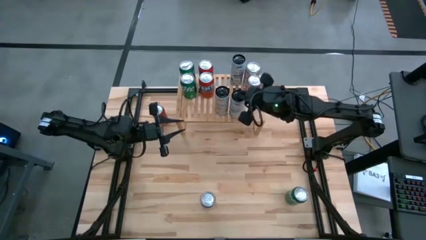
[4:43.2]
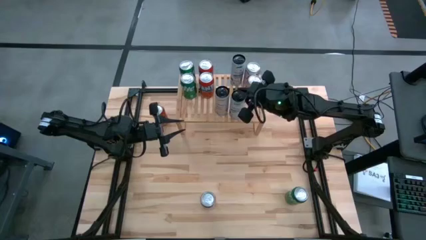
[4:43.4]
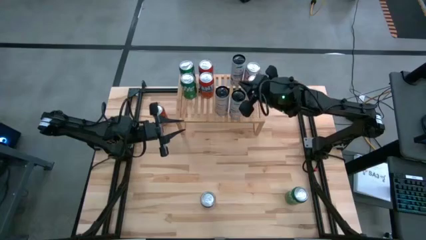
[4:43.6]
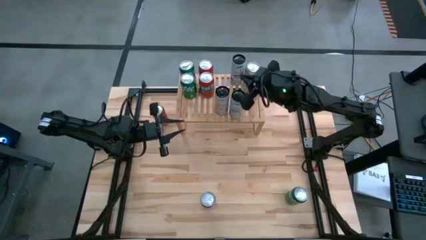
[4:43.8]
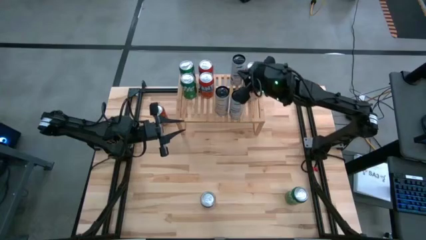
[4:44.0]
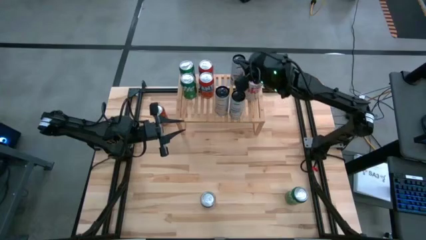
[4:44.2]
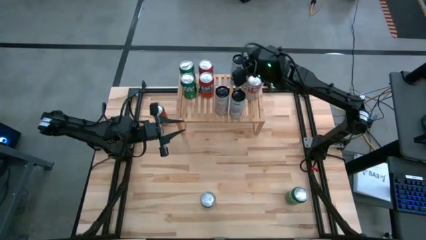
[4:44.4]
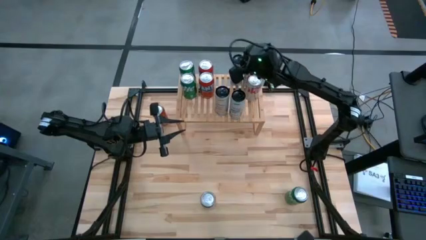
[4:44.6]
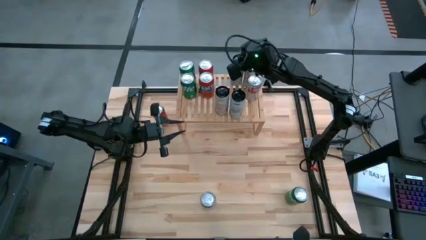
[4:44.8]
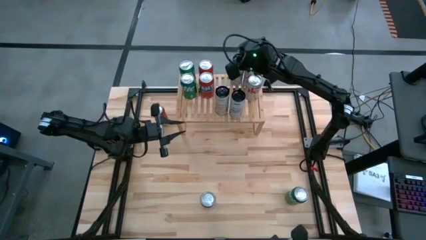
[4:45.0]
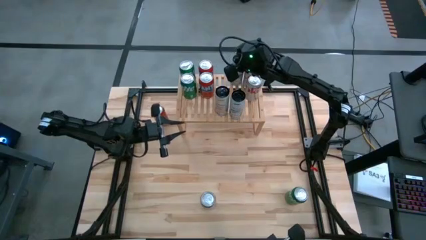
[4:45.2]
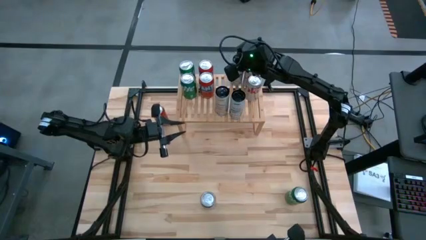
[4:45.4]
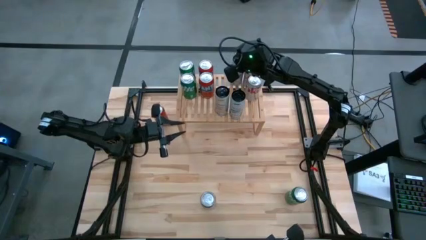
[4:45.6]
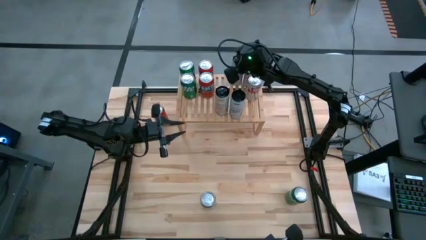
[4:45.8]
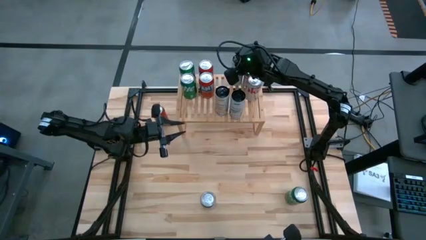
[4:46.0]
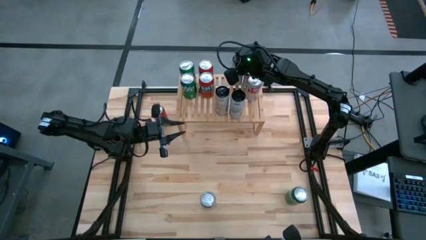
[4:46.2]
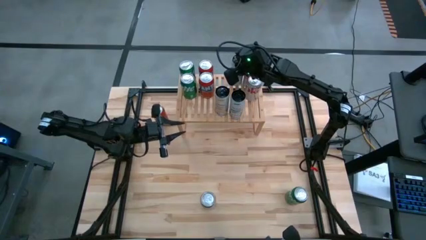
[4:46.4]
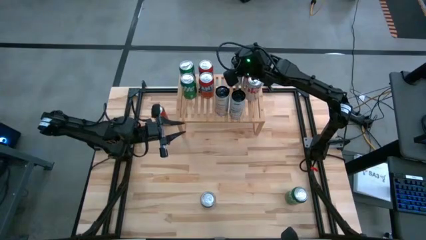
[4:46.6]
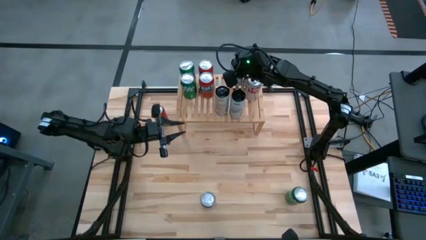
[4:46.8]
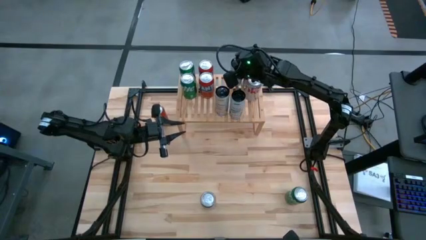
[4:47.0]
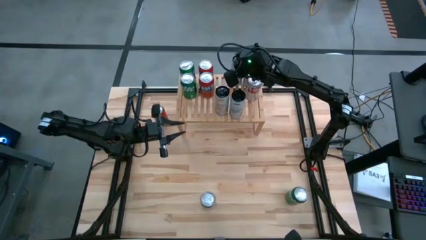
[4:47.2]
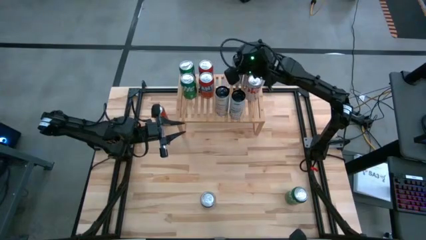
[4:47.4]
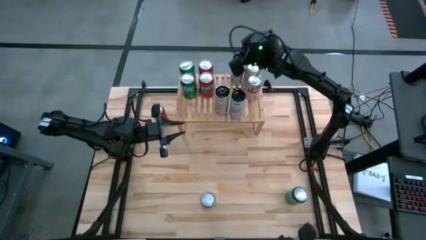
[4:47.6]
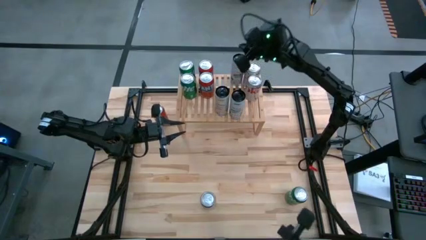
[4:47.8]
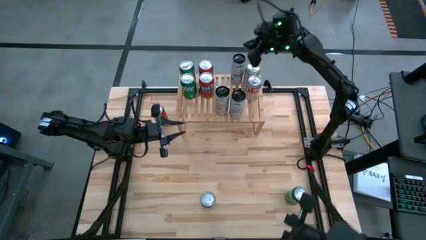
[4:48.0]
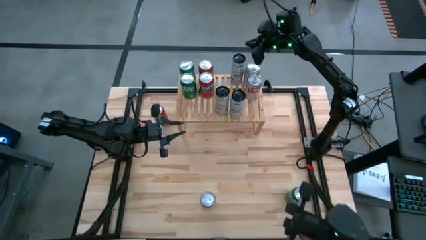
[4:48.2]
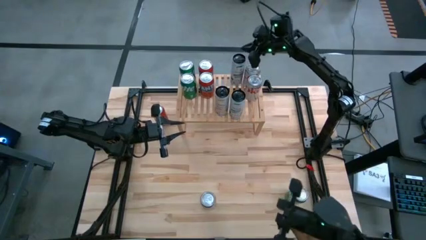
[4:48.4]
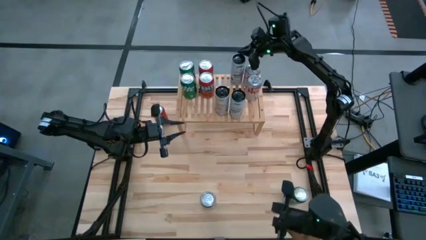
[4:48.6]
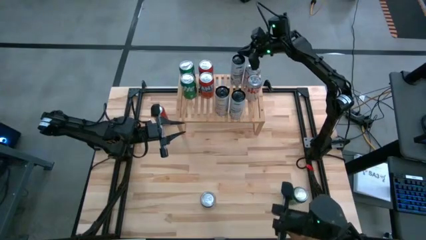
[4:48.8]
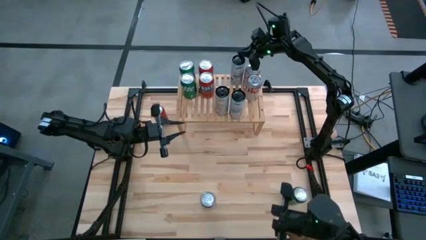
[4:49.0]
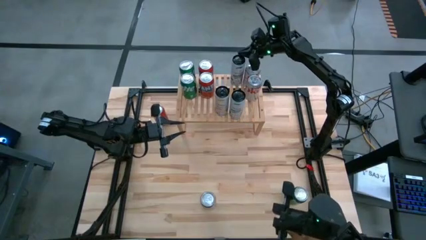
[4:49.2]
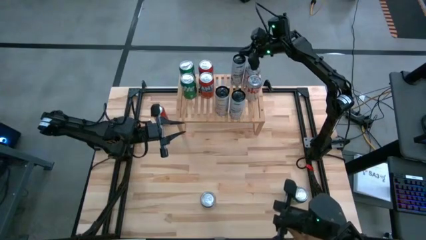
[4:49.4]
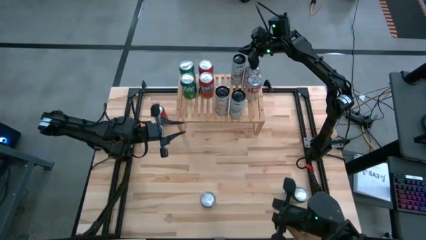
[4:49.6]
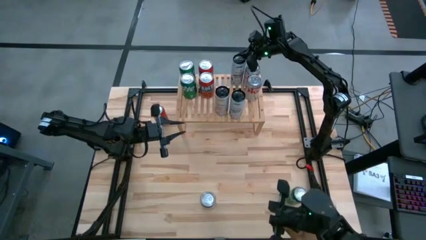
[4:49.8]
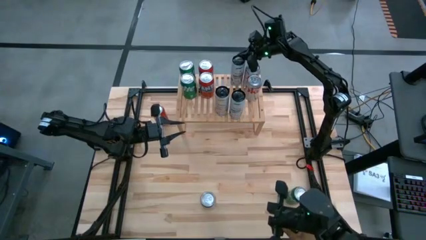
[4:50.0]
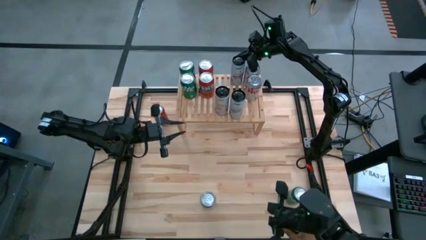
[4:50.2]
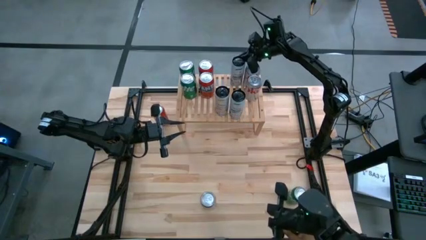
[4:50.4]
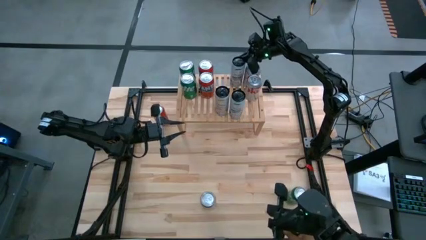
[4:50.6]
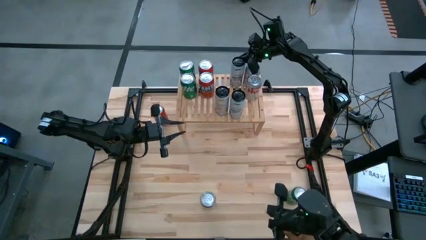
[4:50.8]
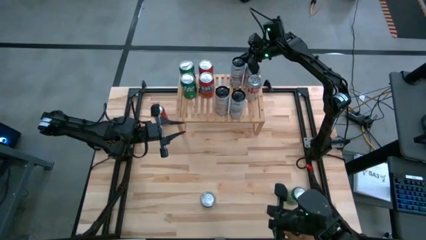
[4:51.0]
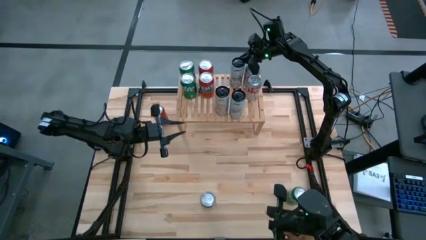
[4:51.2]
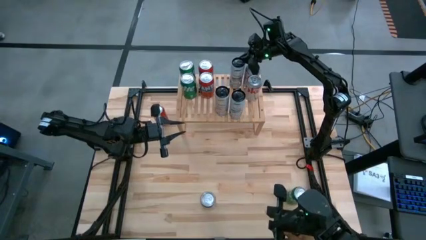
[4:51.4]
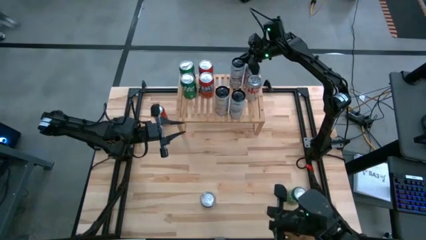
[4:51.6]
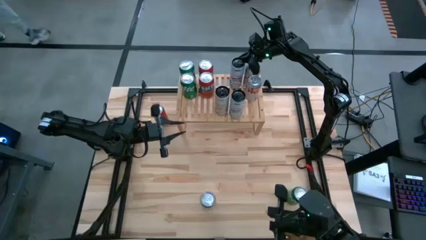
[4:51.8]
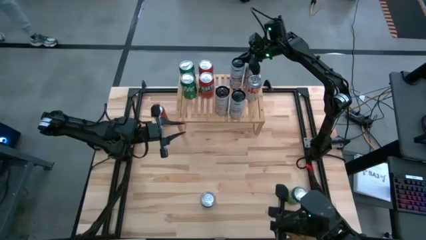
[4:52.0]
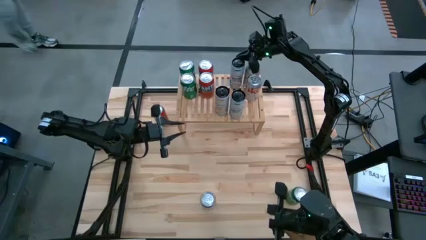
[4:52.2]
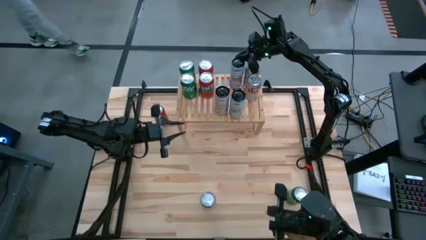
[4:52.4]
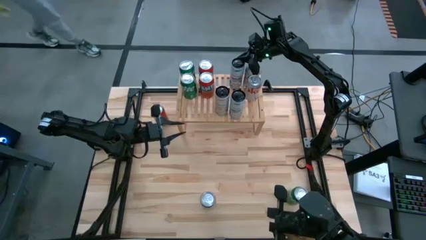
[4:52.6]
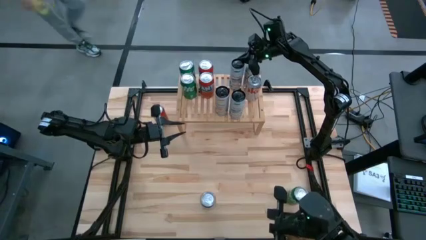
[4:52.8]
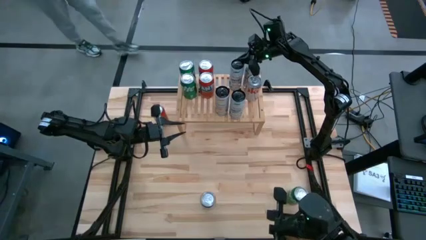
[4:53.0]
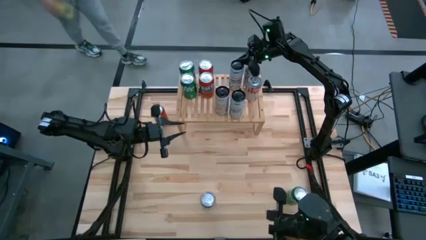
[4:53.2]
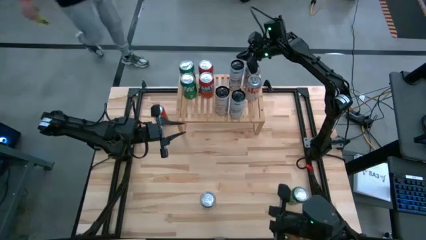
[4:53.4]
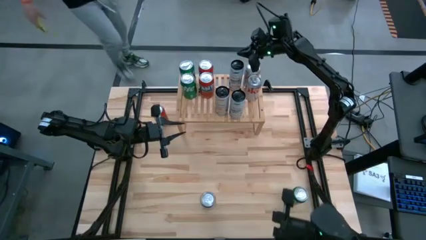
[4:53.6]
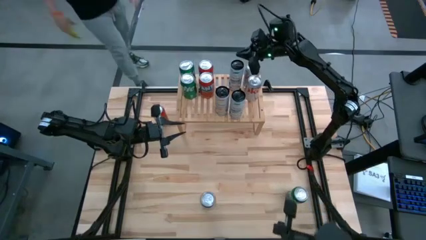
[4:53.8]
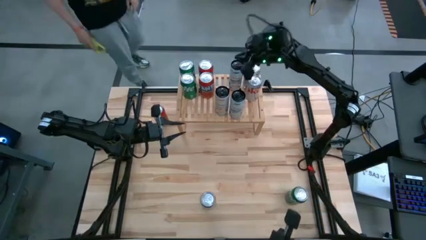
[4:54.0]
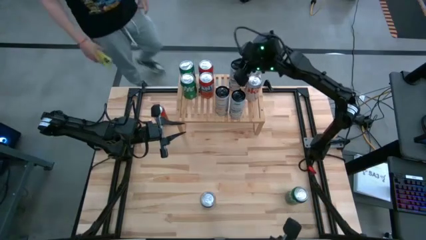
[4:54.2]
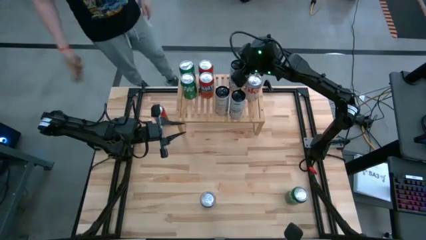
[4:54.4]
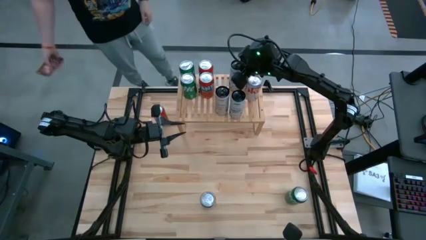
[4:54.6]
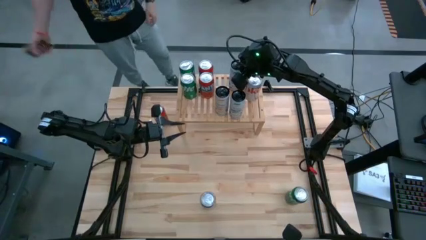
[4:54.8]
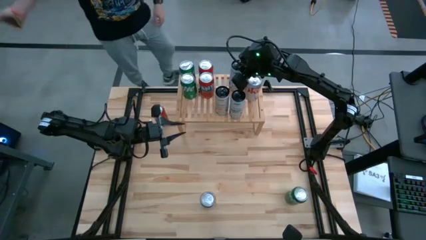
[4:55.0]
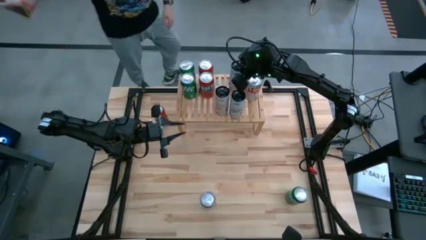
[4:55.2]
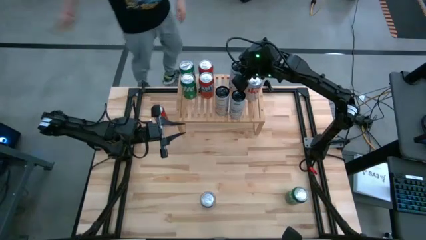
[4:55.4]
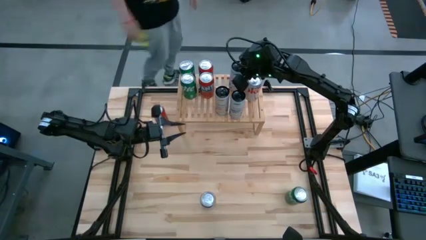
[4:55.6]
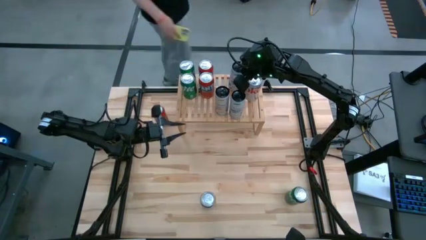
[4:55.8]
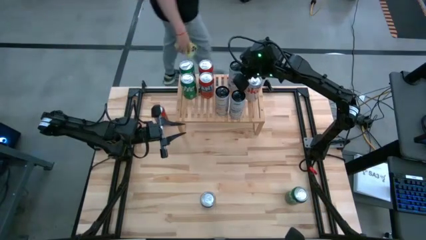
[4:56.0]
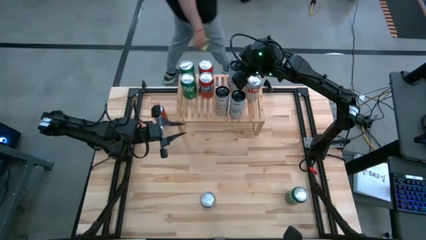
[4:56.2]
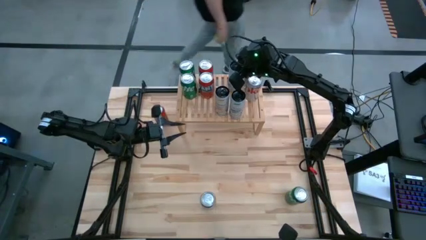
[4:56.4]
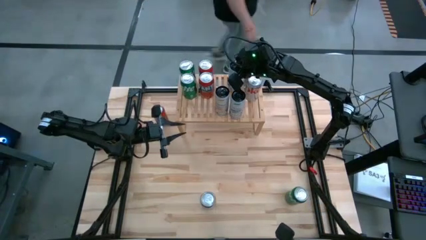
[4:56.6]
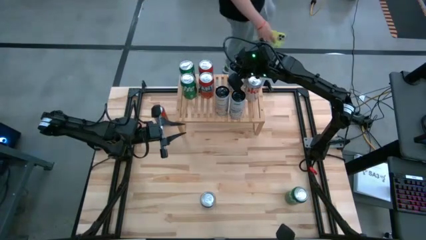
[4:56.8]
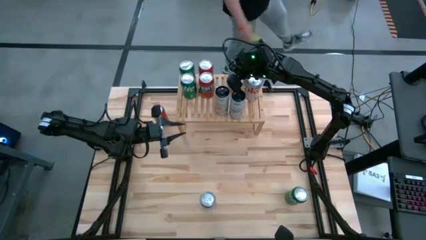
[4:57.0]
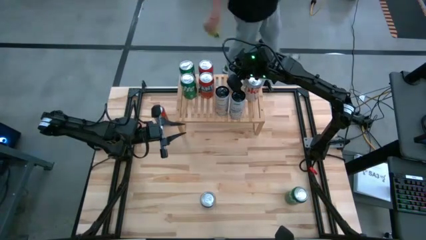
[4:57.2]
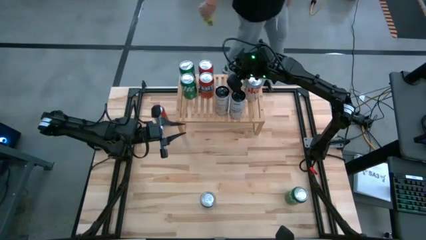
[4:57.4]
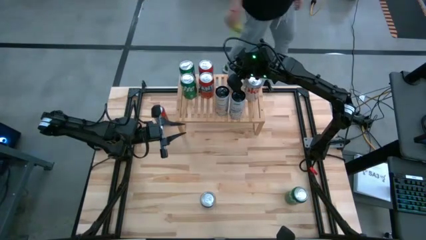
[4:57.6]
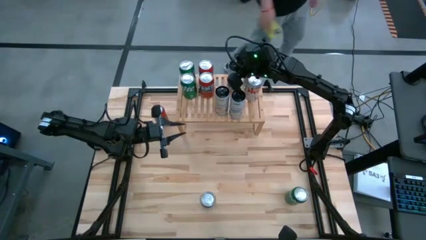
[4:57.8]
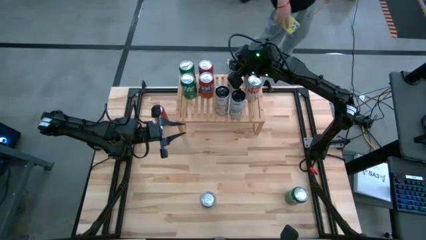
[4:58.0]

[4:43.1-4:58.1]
Task: Place canned beverage on shelf
Adjust the soda cans on the shelf
